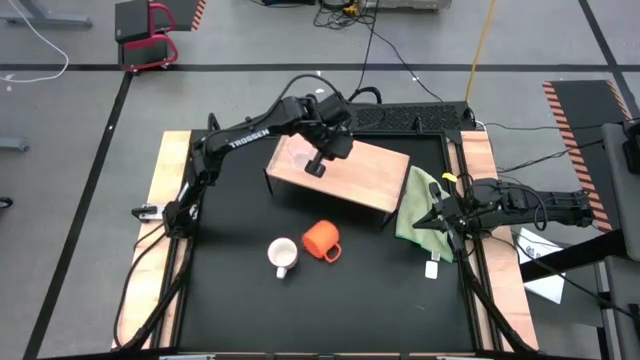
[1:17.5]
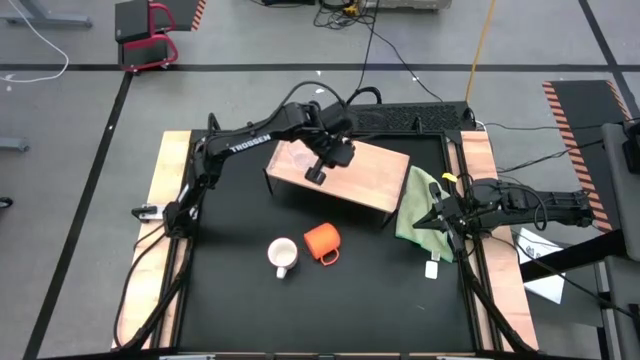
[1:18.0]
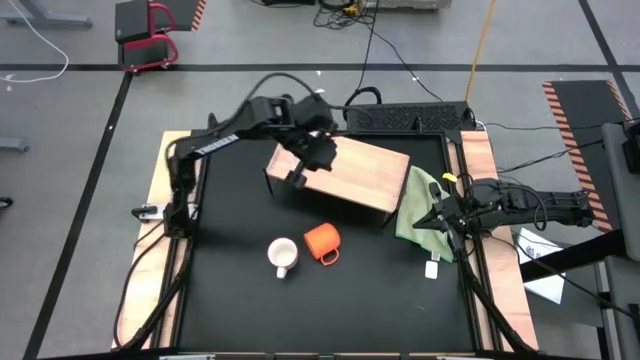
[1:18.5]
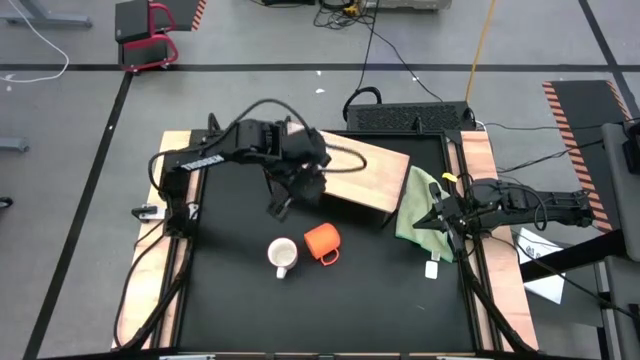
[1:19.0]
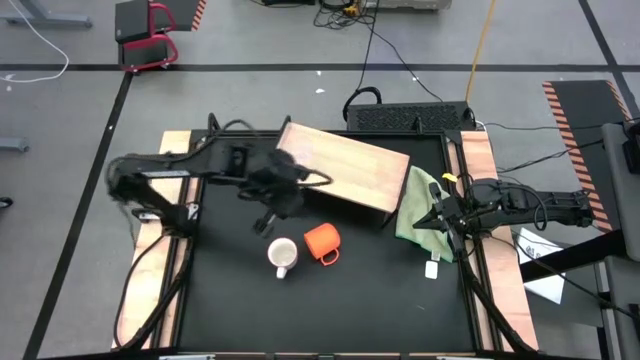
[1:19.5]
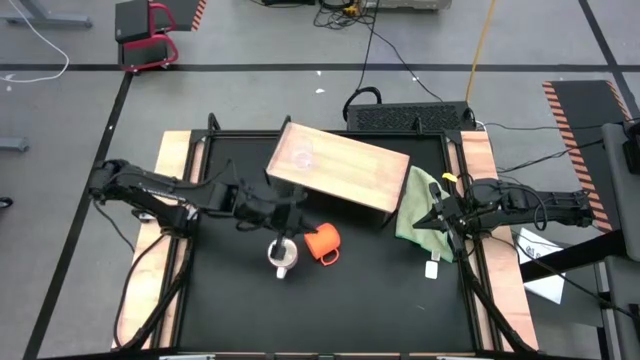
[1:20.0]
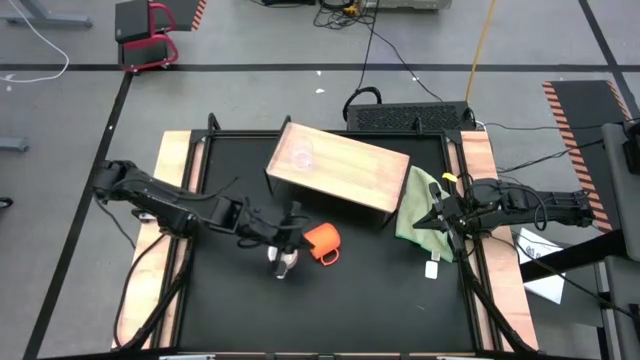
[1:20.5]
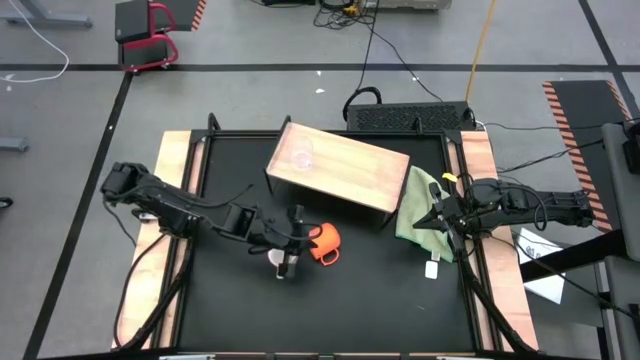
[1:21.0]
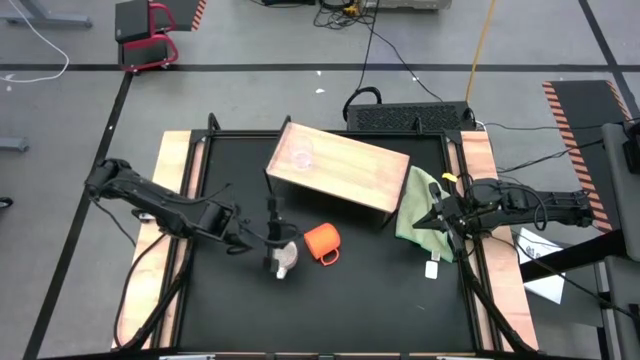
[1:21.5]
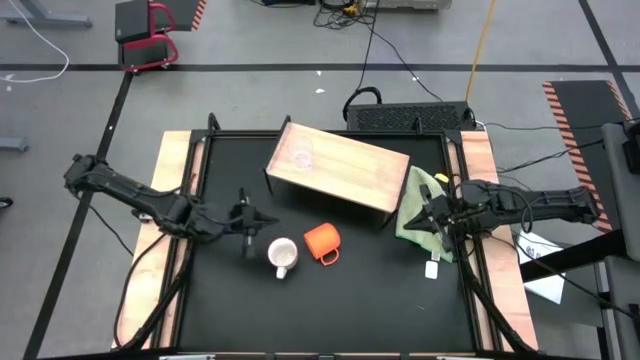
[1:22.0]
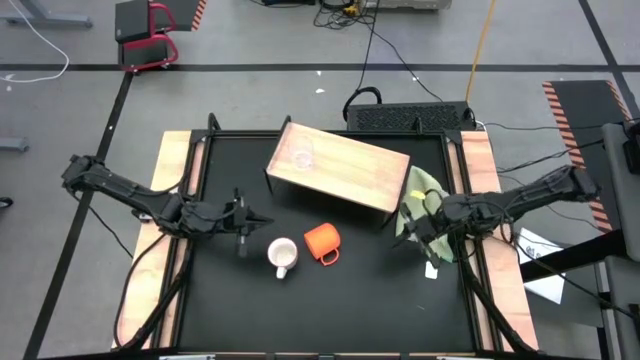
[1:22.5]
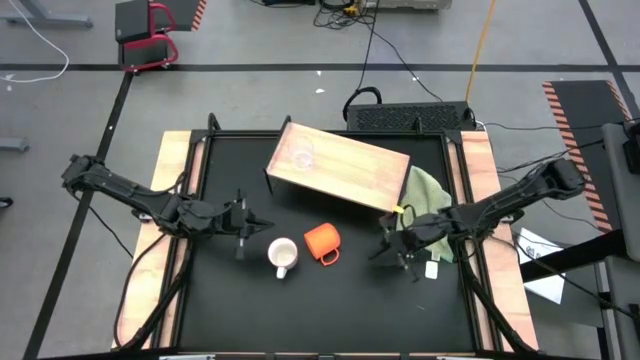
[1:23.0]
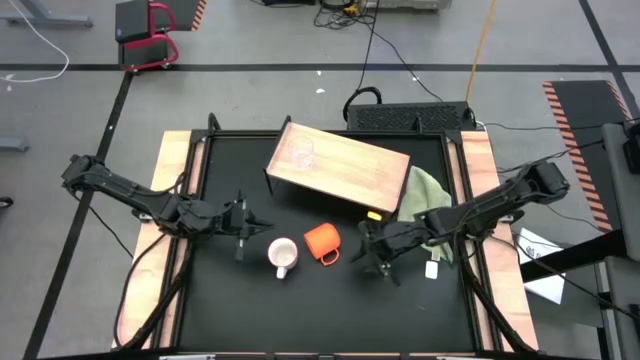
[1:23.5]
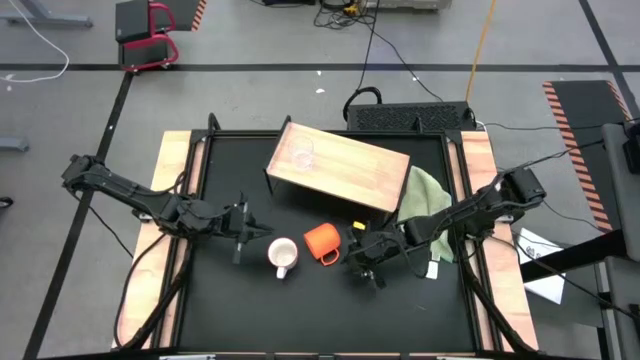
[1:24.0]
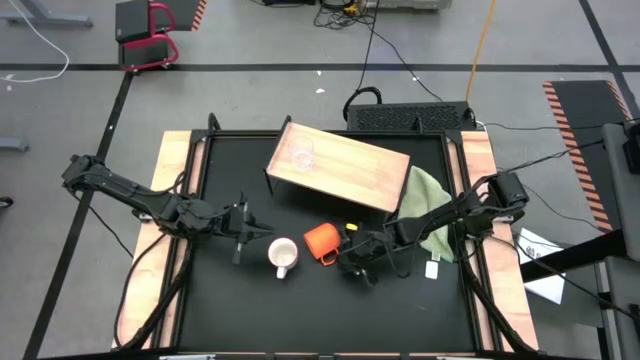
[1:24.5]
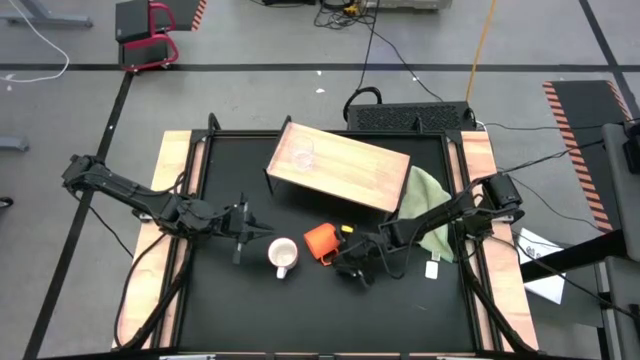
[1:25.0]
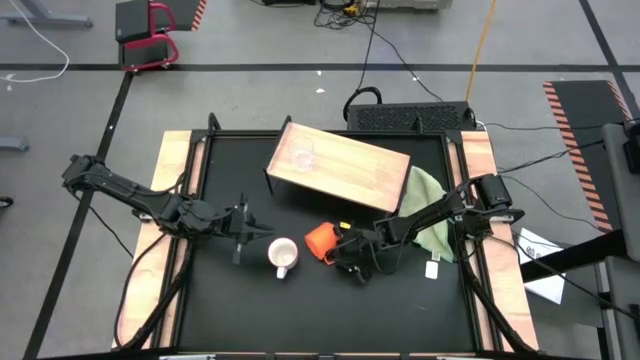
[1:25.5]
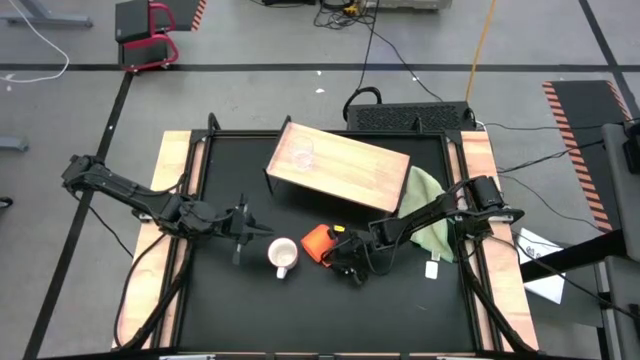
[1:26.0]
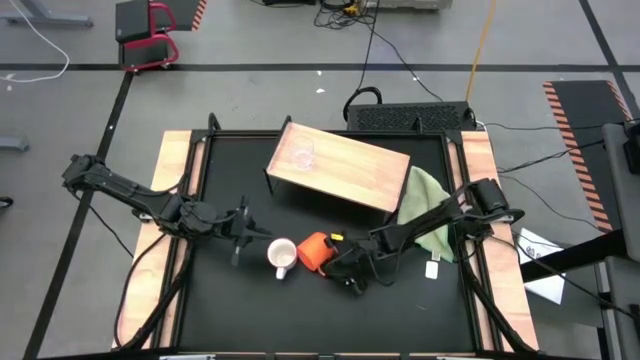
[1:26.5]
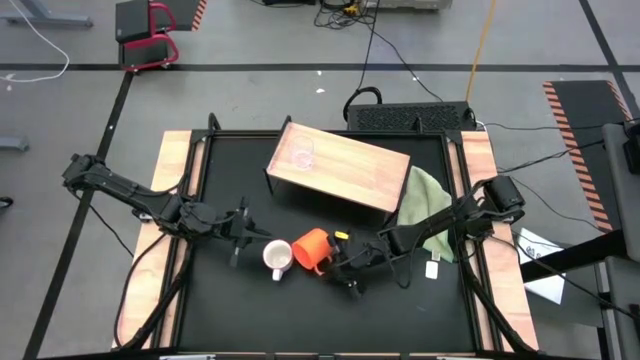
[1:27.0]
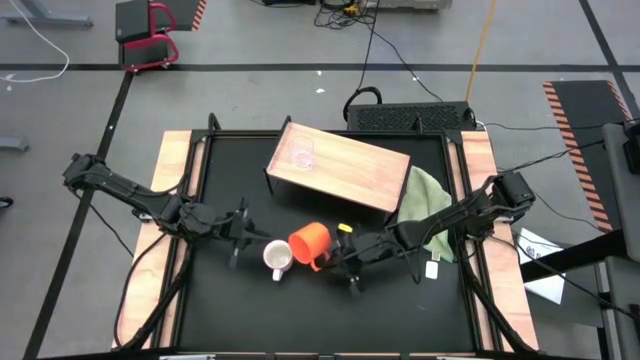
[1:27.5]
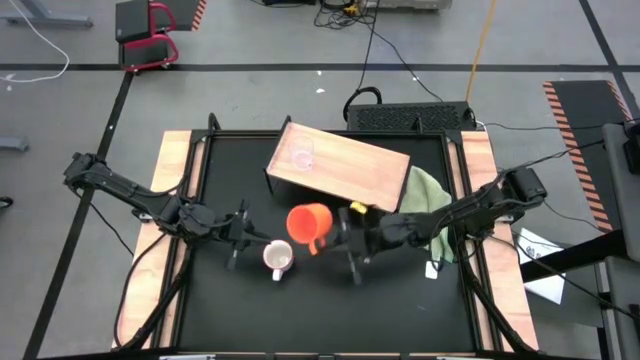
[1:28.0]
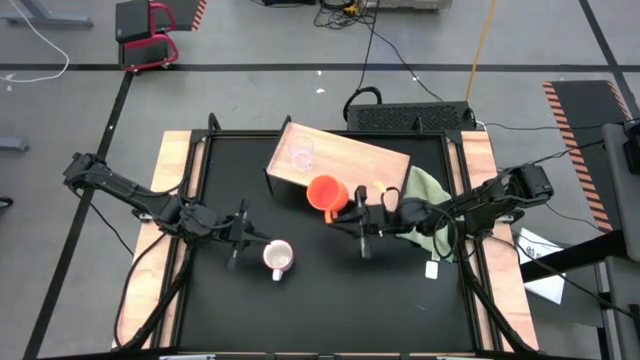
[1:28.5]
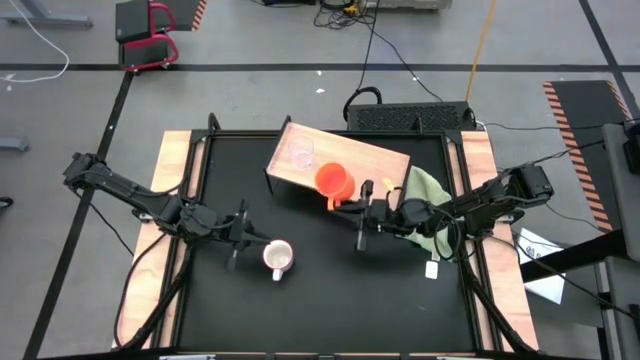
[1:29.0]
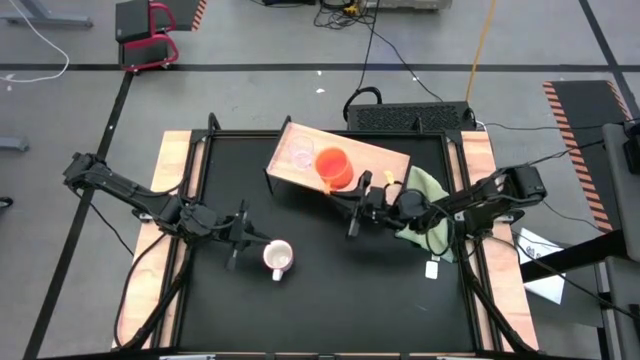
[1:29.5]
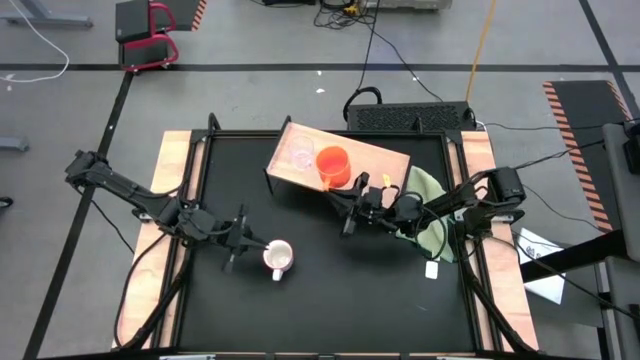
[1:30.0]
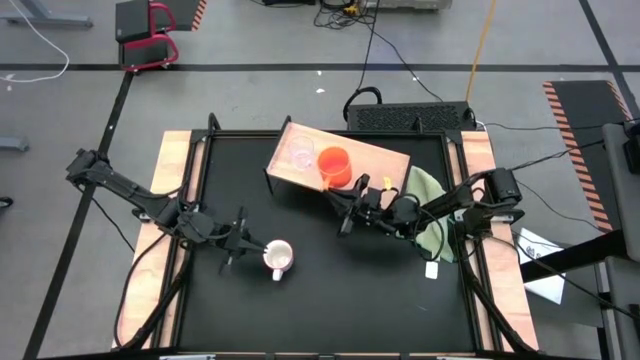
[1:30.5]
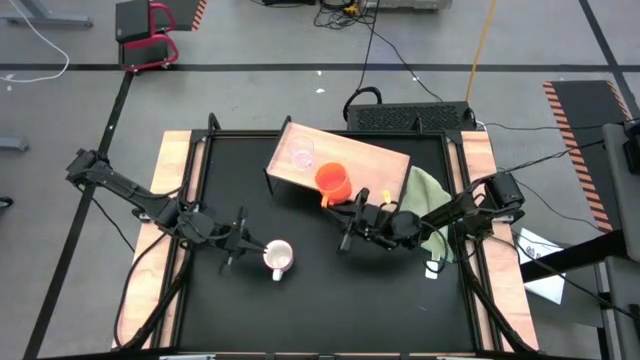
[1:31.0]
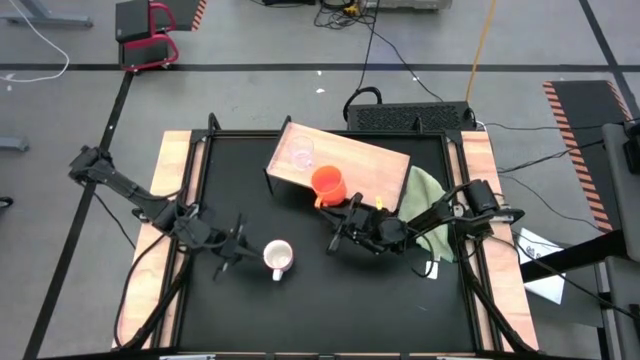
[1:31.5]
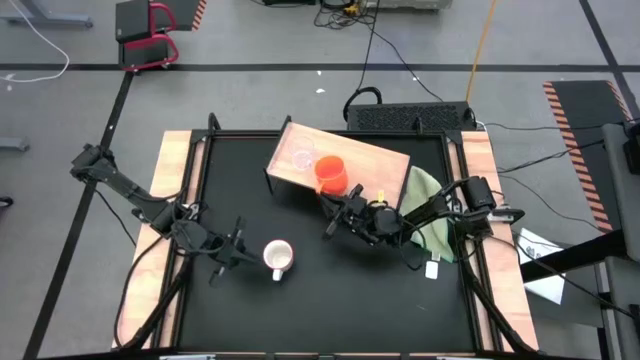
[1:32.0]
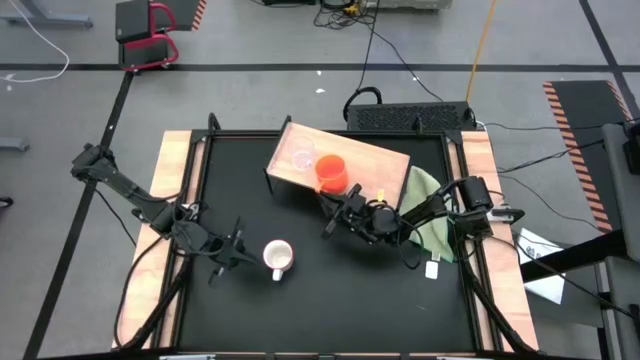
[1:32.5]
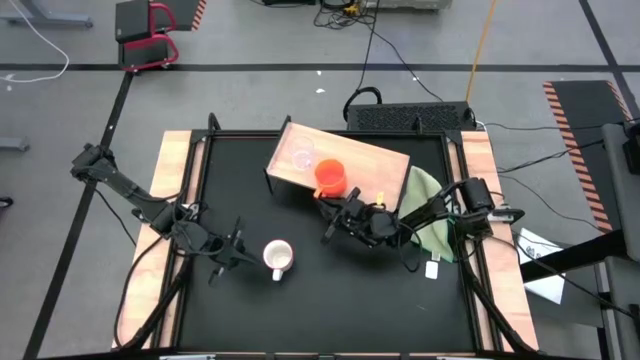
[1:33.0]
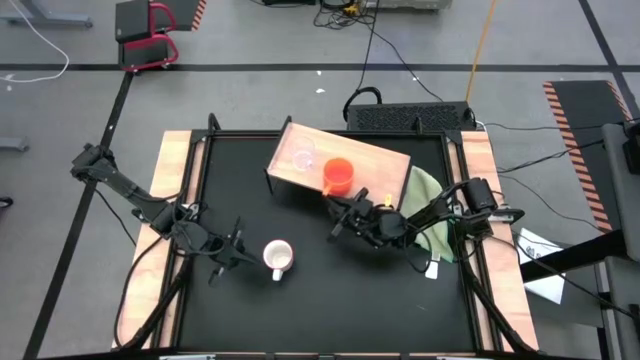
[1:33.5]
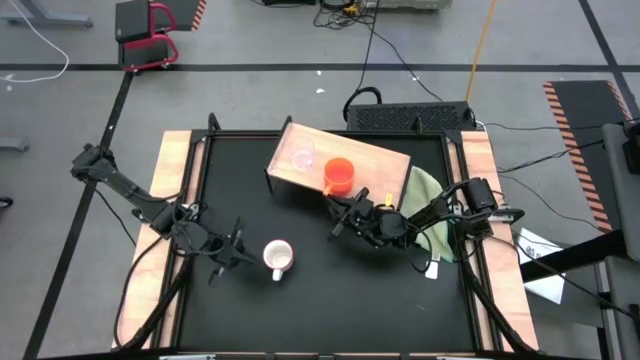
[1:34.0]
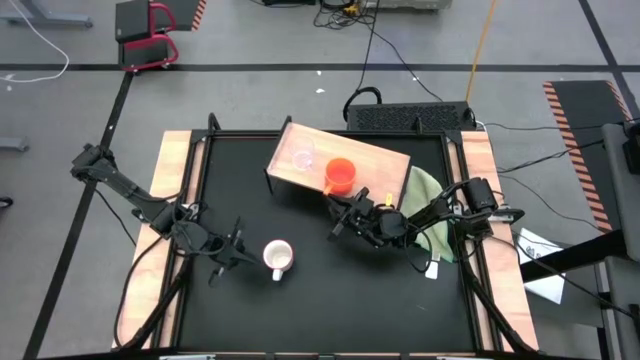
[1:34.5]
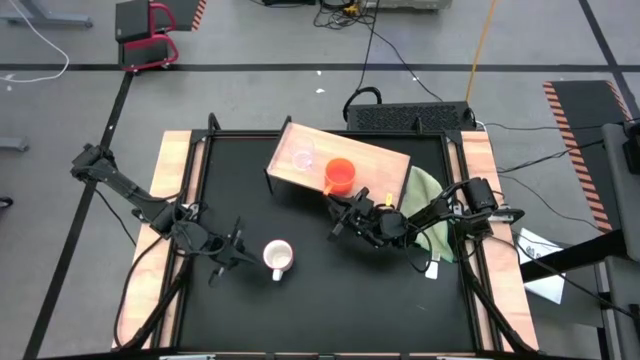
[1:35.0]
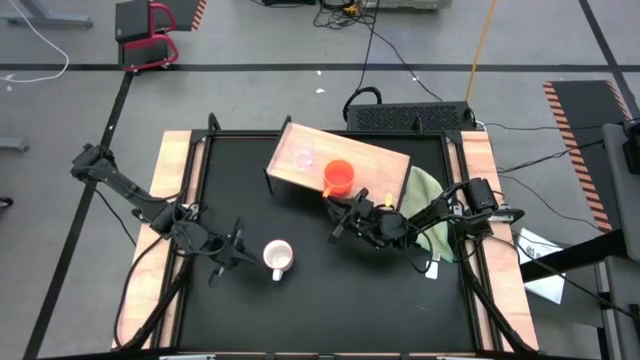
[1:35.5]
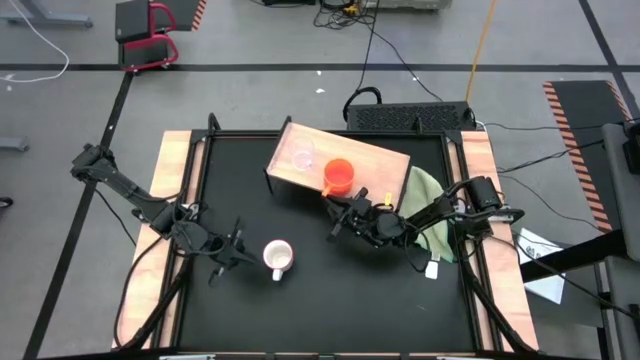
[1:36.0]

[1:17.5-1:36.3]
Task: Stack small to large cups/mugs on shelf
Put the orange mug on the shelf
